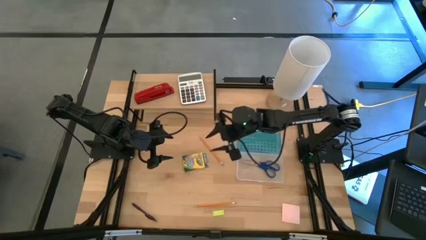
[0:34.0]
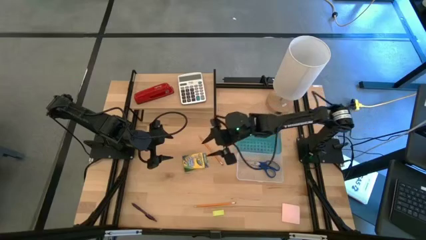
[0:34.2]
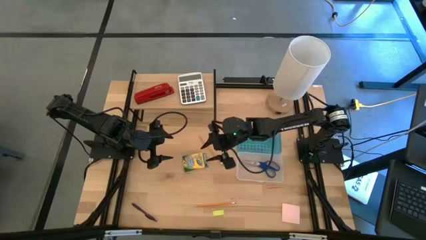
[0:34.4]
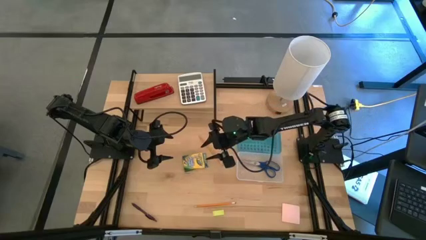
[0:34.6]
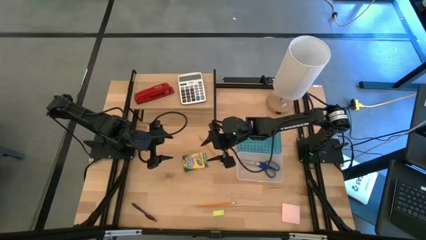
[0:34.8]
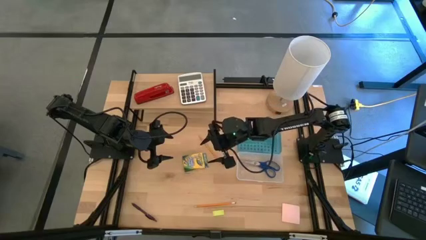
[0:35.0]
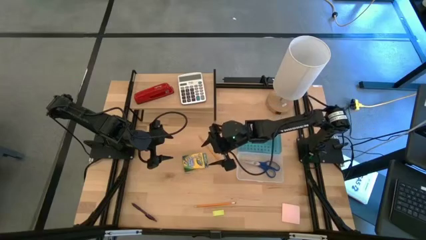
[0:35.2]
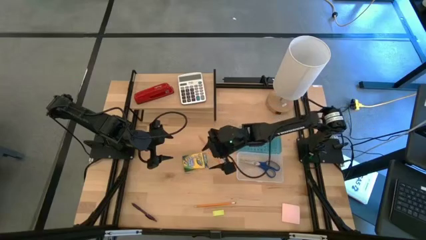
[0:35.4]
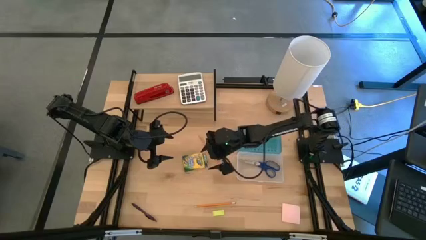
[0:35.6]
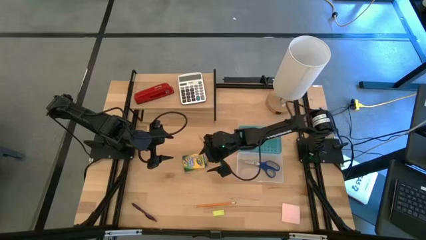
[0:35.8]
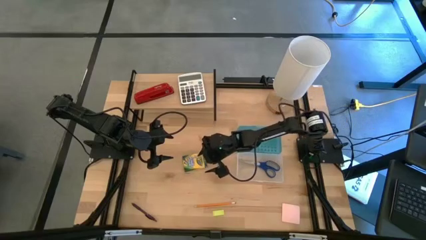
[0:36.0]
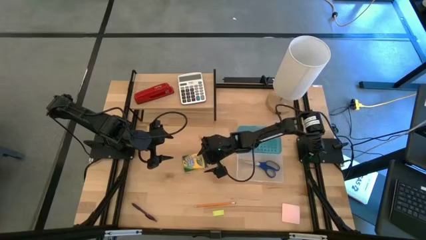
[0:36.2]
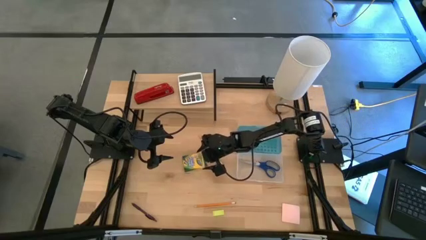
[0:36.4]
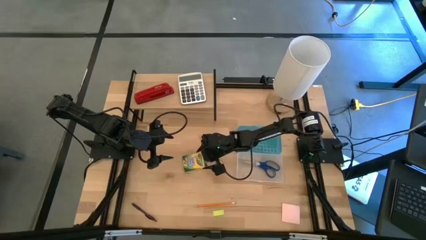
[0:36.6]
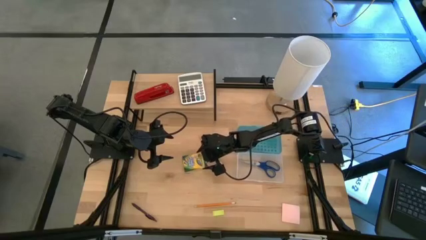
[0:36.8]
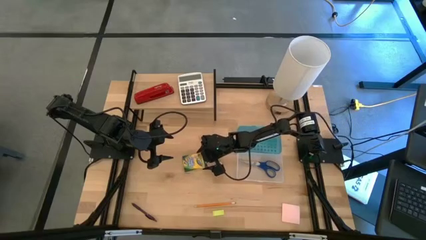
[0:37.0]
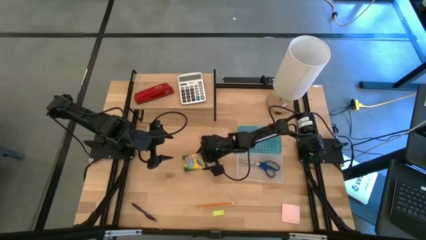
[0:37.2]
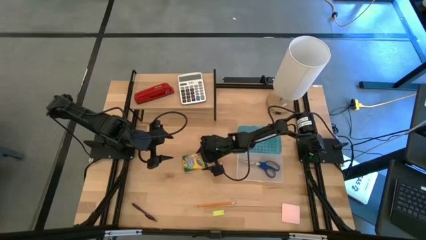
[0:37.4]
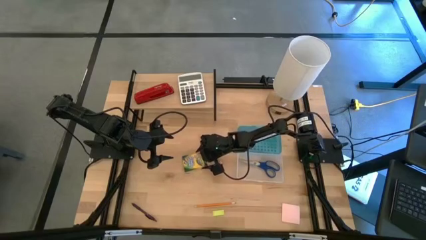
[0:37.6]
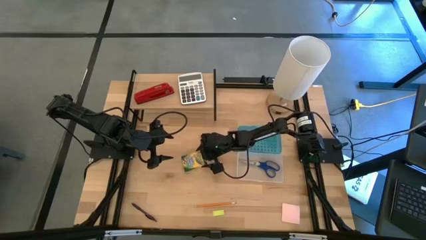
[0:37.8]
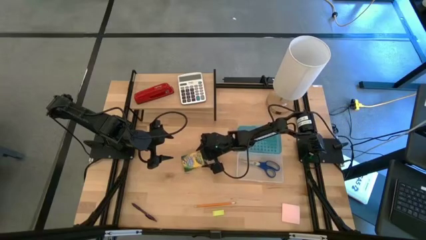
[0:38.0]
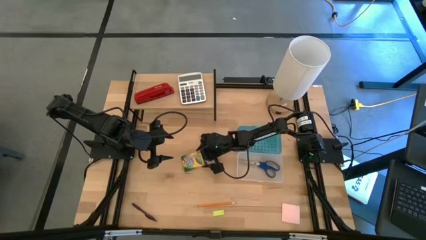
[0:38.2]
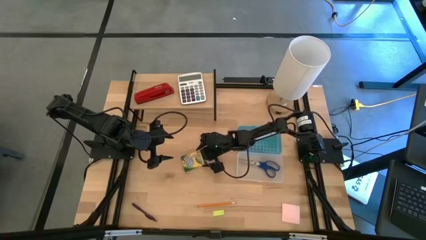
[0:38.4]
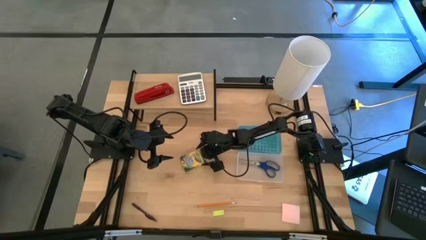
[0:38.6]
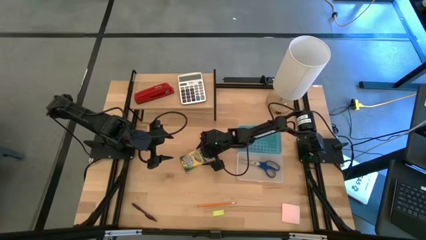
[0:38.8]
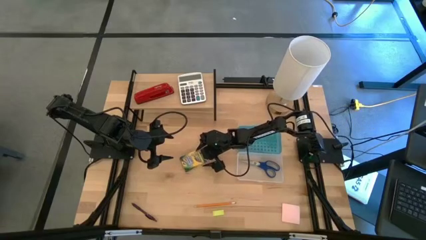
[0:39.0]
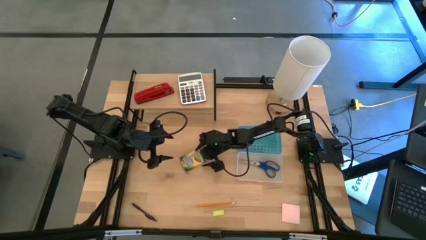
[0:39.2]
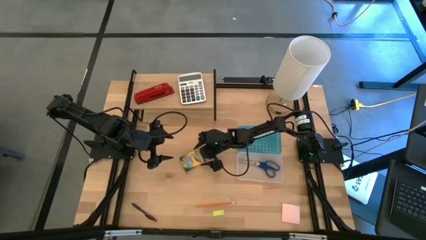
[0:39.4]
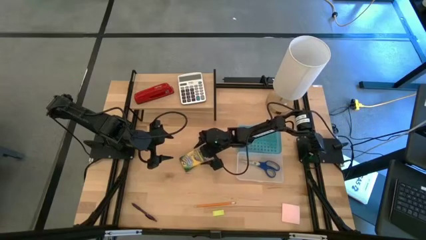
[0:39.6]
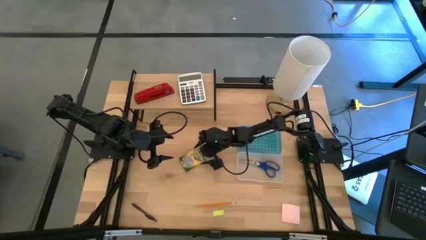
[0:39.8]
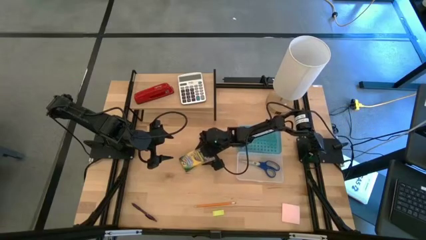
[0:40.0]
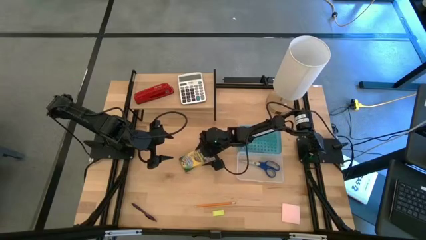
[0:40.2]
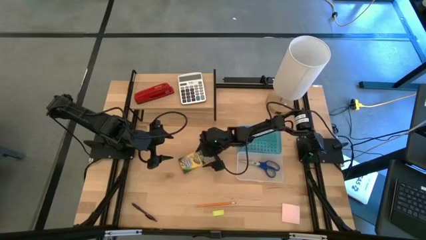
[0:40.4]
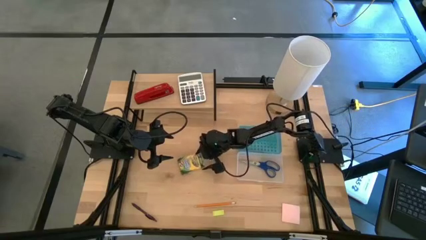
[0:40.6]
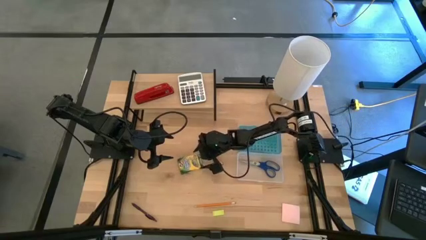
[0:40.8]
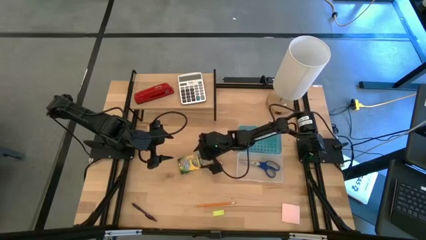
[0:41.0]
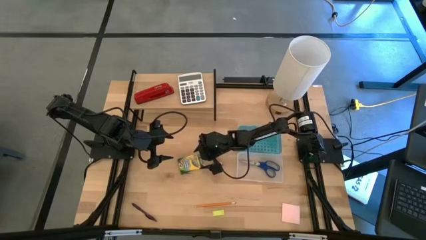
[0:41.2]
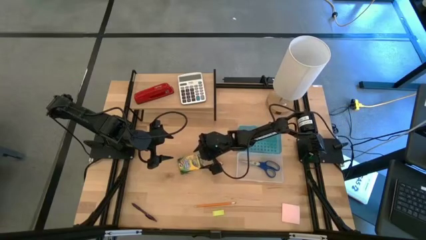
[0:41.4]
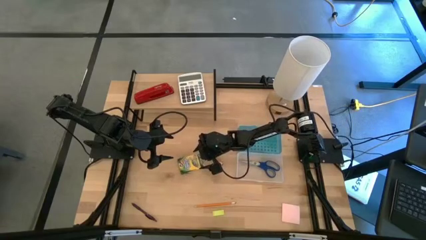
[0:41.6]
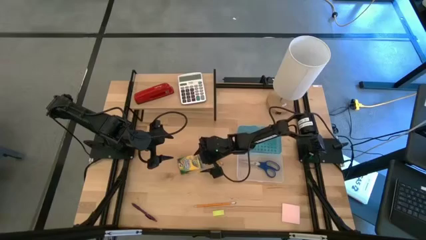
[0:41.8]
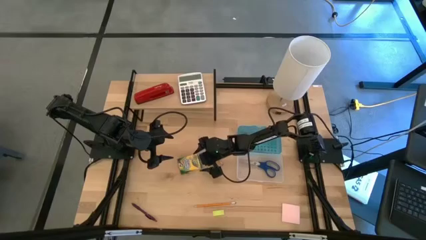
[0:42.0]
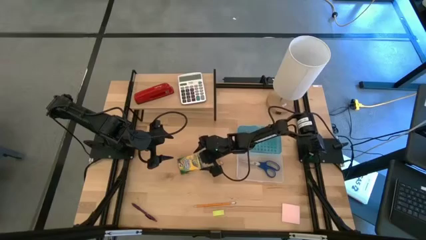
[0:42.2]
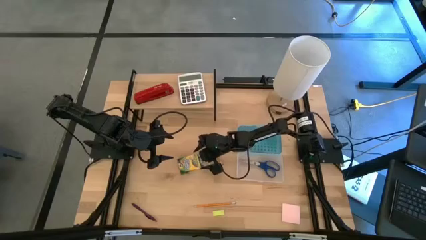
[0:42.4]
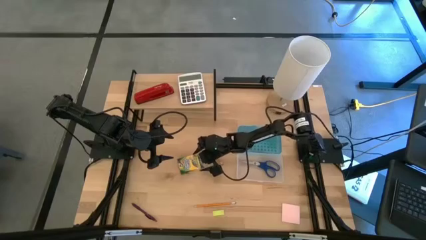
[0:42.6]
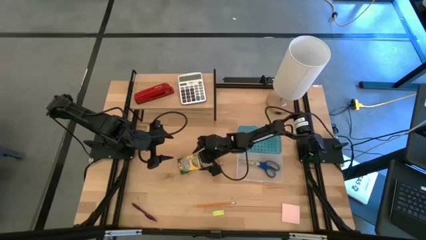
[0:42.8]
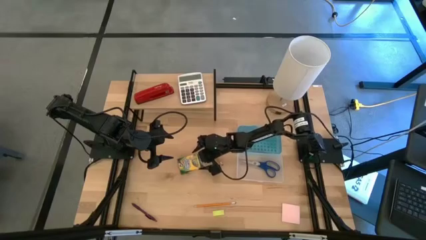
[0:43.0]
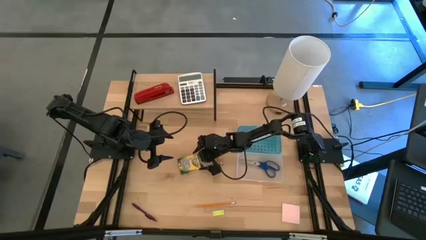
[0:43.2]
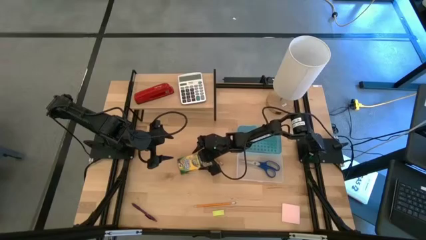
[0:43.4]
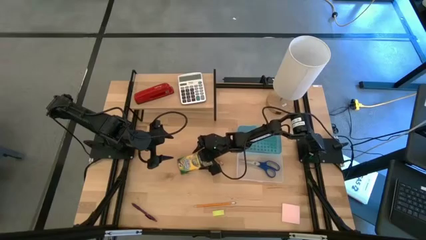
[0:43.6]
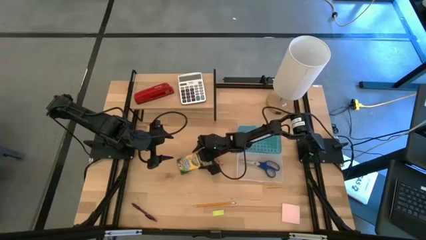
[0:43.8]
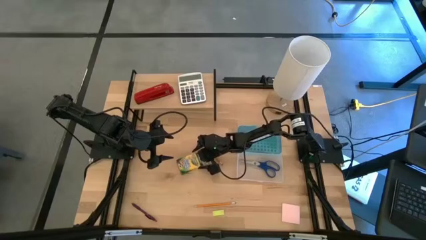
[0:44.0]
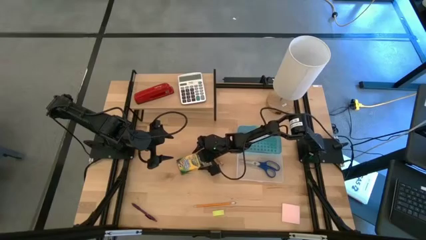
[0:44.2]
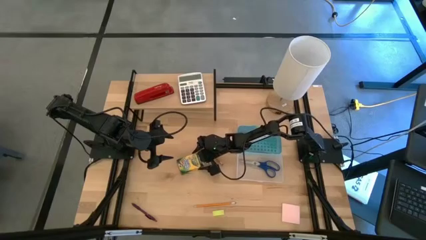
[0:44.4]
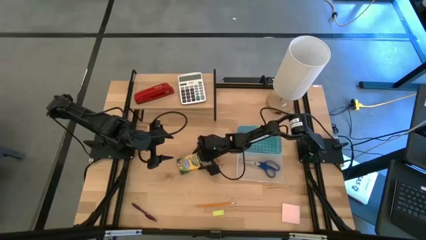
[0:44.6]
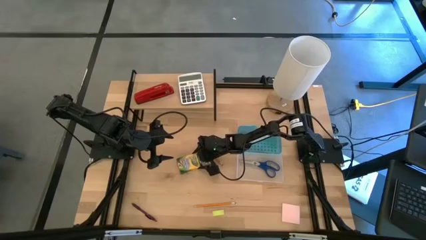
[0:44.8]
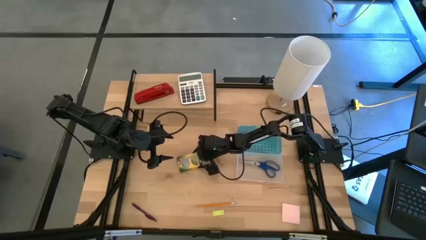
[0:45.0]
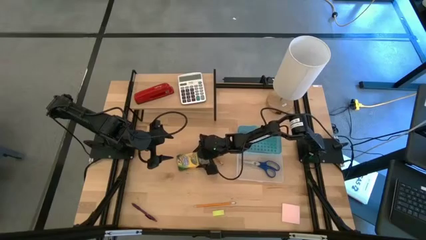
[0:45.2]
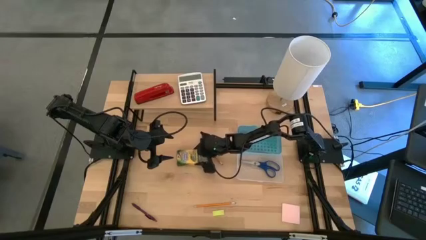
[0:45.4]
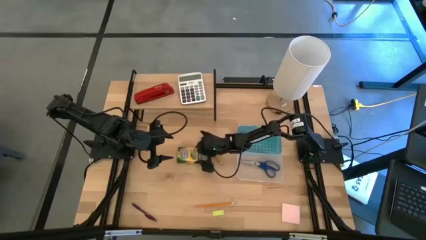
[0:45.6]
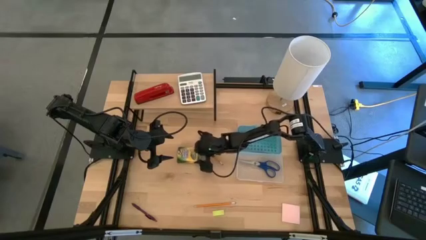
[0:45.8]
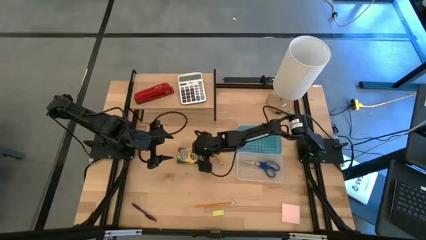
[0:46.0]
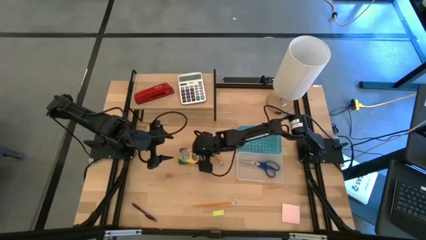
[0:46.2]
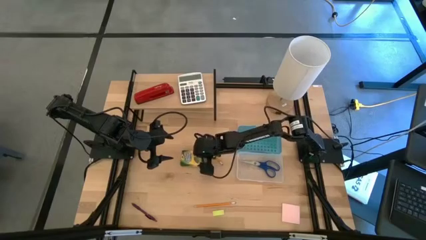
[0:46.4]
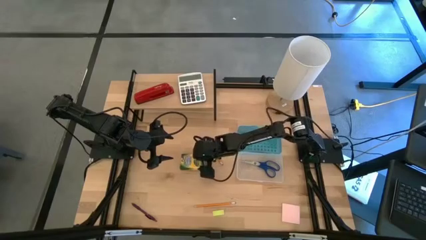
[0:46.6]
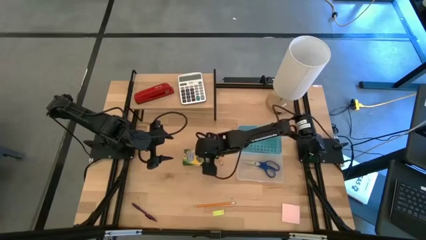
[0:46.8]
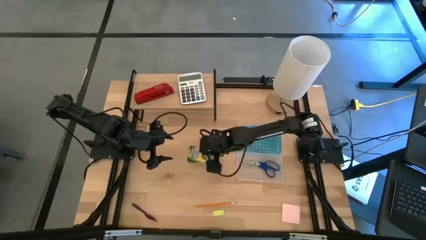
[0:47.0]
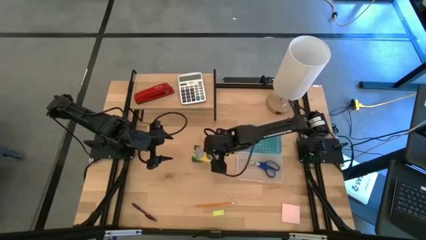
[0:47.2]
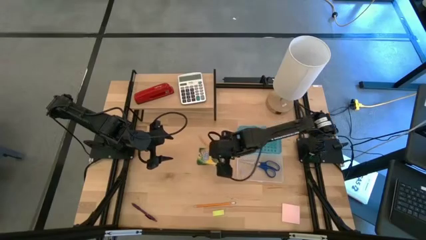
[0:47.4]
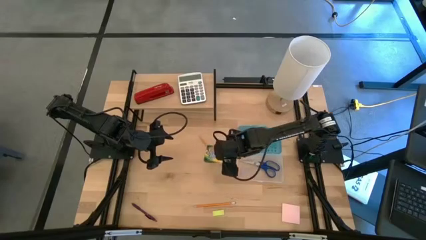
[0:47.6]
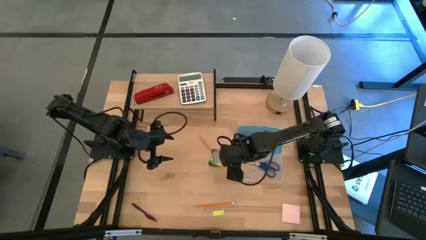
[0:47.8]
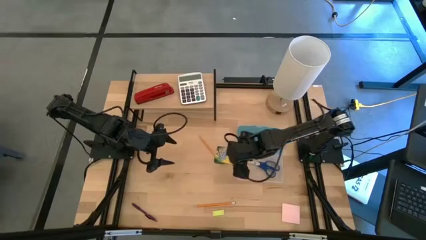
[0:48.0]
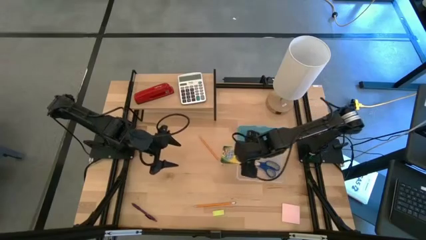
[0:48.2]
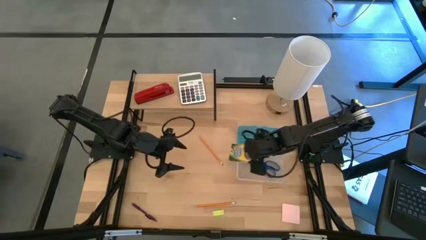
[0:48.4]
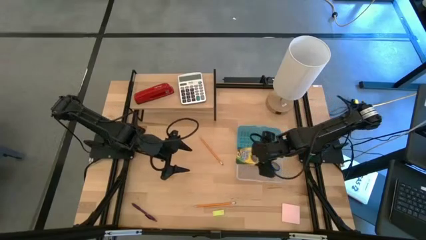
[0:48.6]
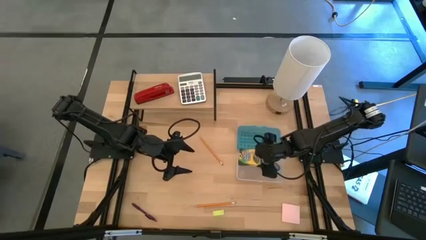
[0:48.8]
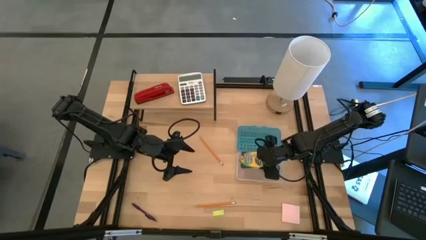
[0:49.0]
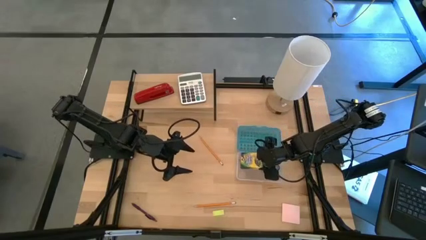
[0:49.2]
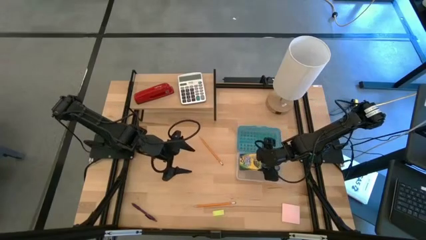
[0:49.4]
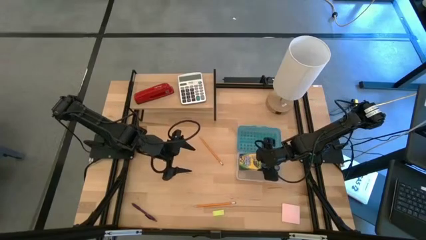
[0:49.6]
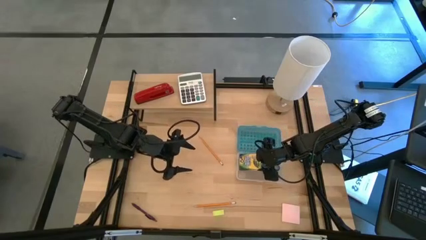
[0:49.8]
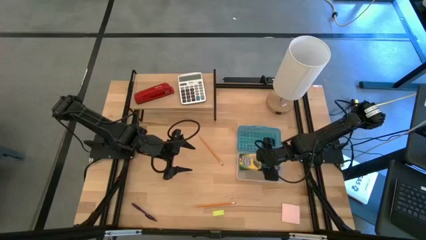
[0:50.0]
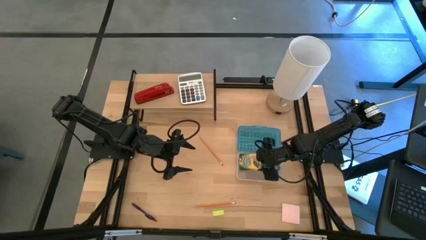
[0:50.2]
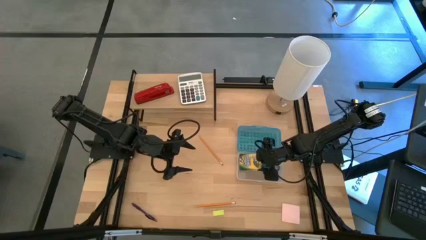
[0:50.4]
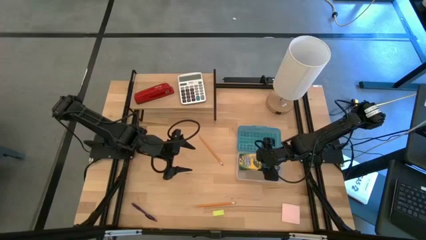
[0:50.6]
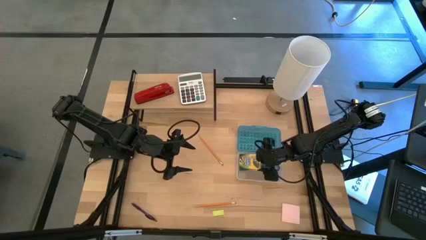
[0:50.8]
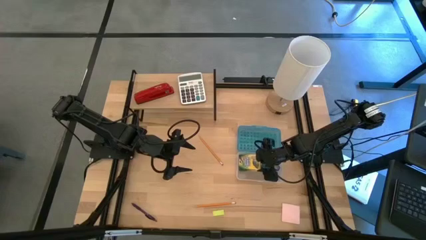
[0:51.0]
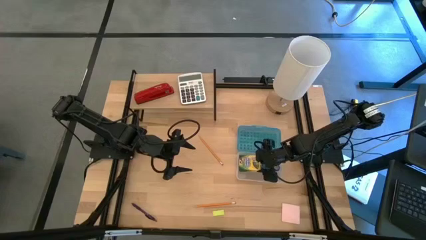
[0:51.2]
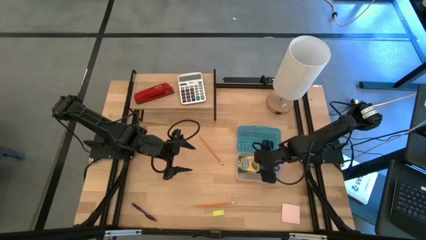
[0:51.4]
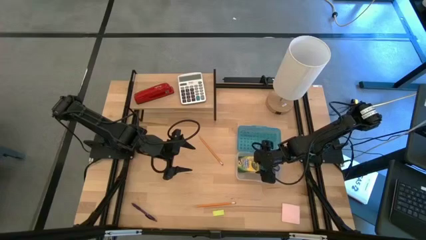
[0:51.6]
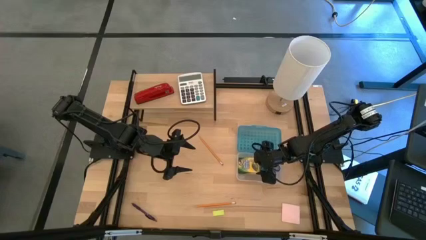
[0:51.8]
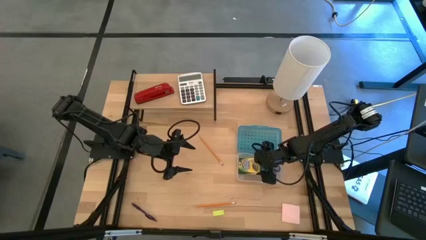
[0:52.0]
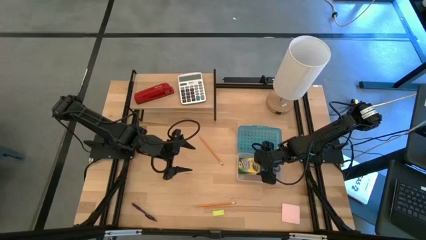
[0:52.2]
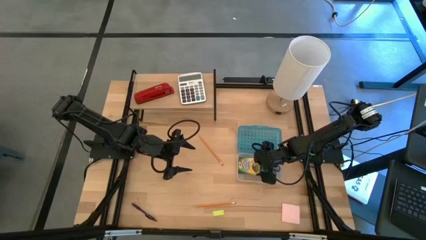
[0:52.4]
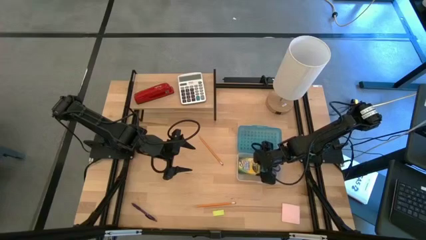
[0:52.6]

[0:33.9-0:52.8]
Task: Pack school essentials
Put the yellow crayon box into the blue supply box
